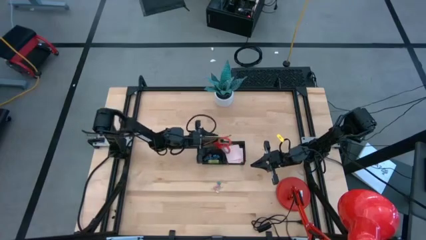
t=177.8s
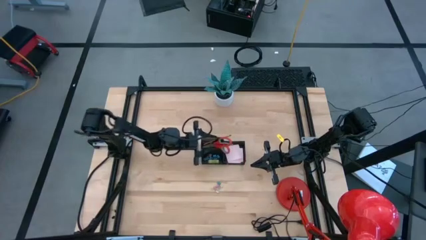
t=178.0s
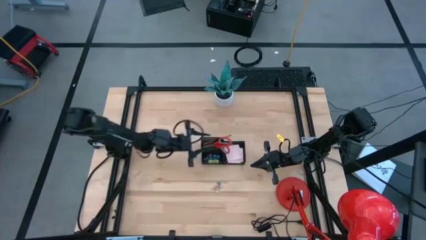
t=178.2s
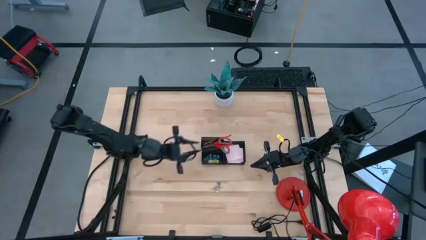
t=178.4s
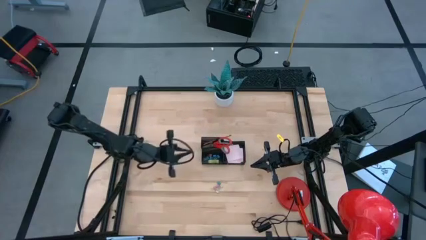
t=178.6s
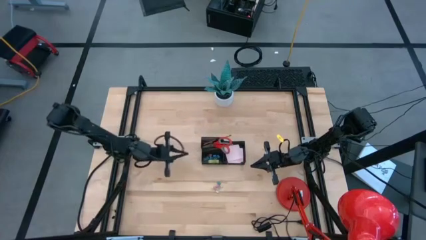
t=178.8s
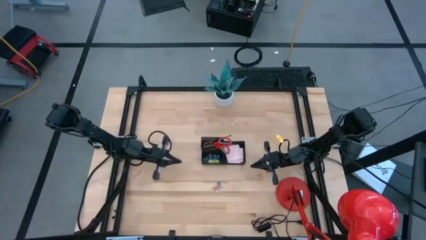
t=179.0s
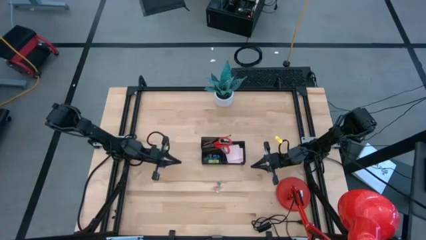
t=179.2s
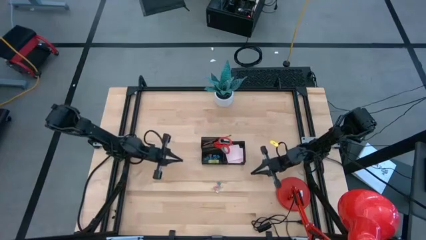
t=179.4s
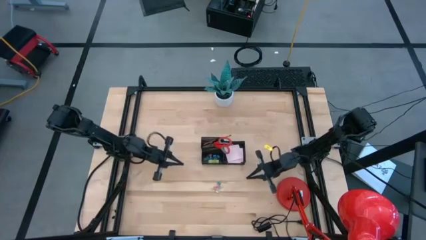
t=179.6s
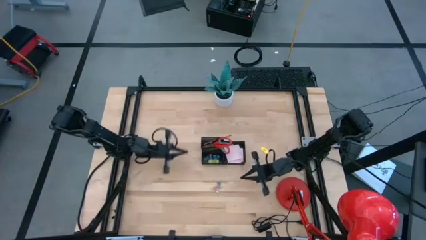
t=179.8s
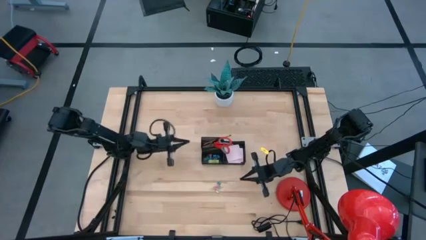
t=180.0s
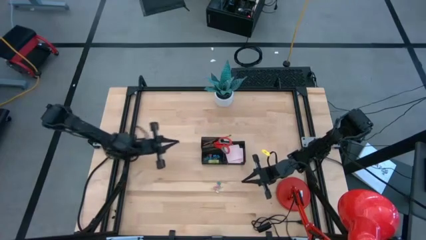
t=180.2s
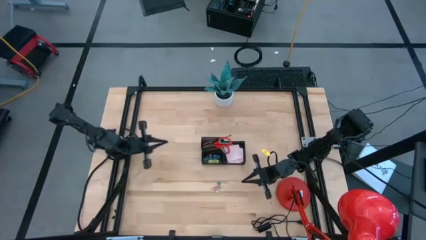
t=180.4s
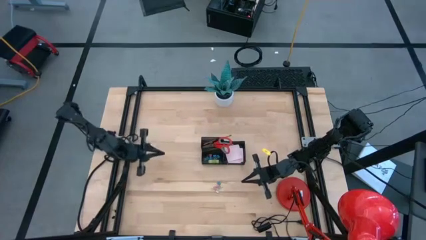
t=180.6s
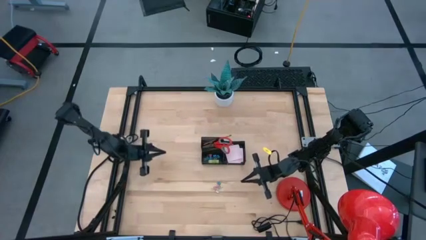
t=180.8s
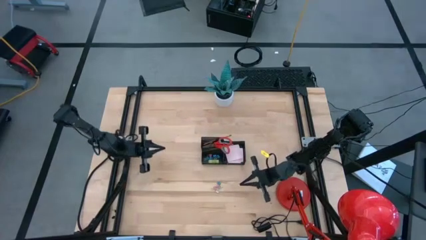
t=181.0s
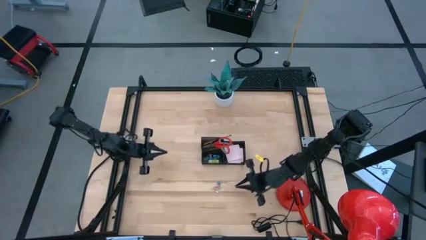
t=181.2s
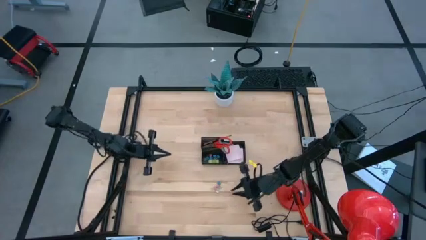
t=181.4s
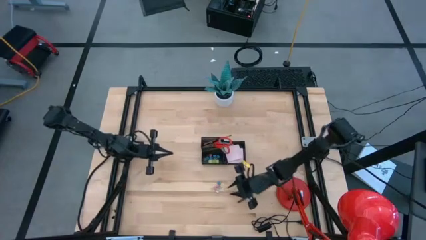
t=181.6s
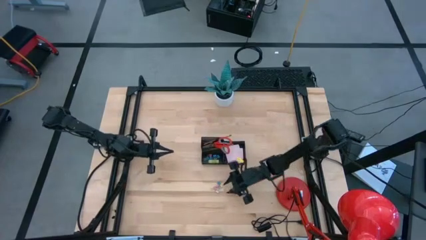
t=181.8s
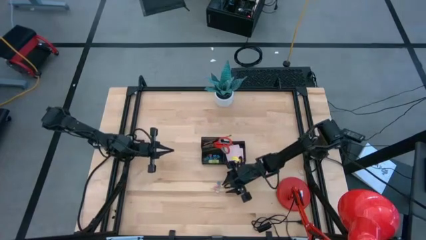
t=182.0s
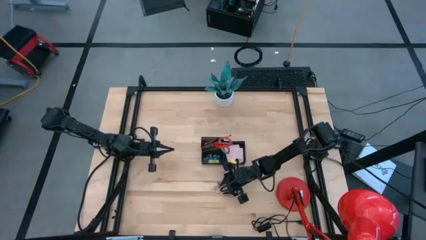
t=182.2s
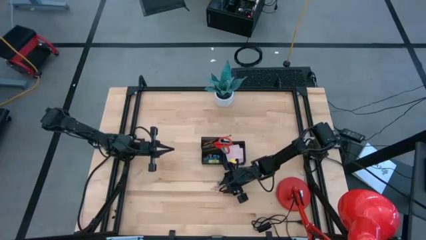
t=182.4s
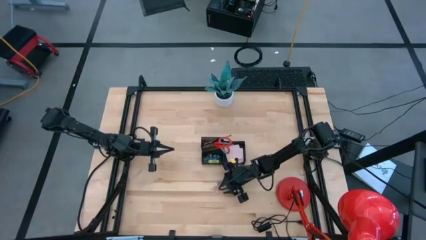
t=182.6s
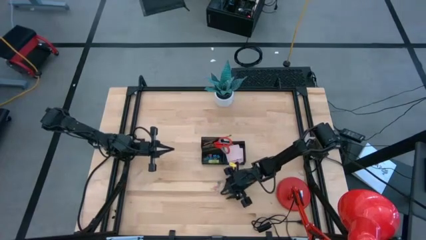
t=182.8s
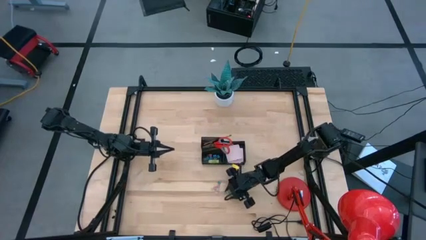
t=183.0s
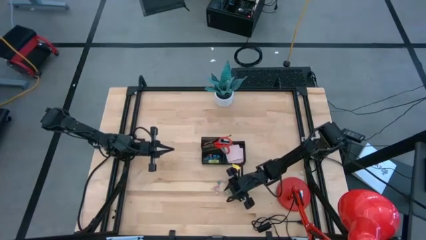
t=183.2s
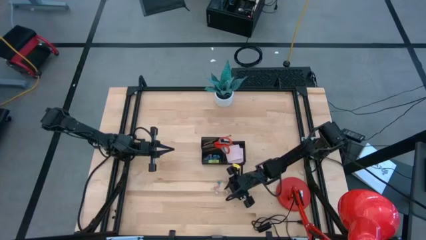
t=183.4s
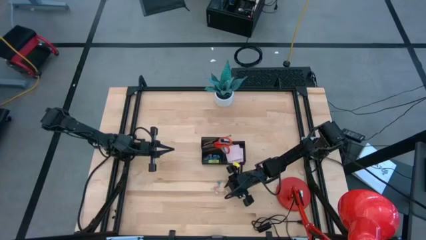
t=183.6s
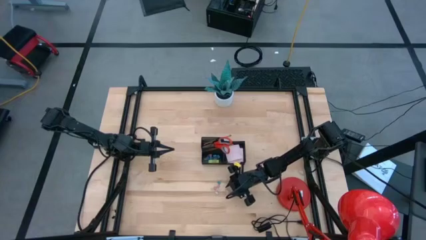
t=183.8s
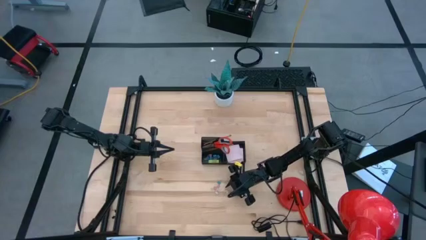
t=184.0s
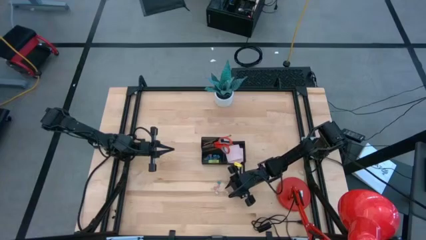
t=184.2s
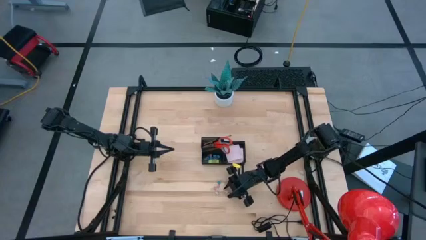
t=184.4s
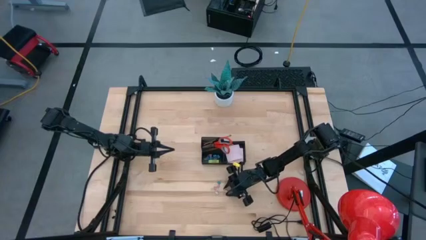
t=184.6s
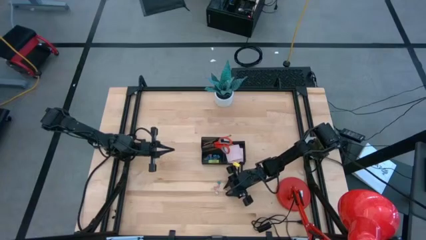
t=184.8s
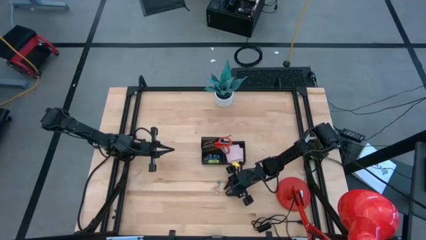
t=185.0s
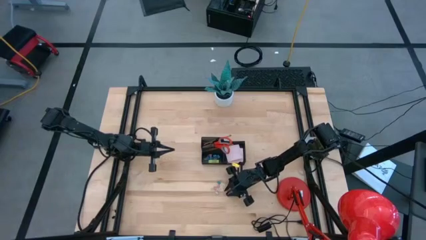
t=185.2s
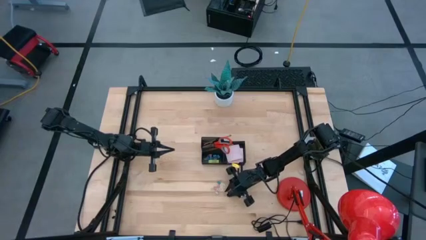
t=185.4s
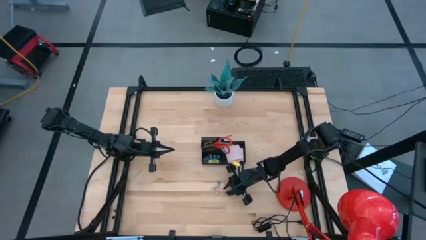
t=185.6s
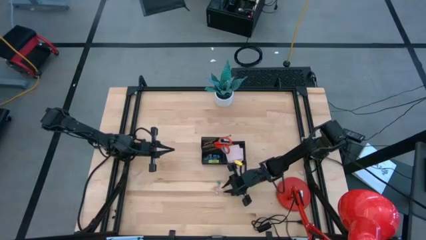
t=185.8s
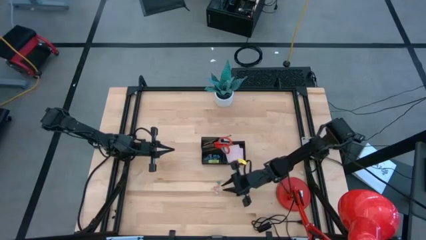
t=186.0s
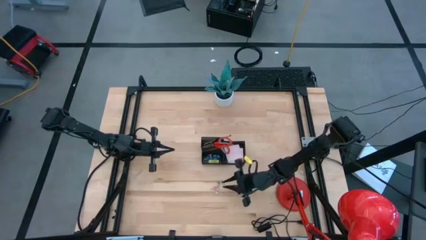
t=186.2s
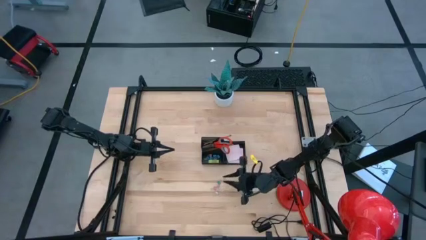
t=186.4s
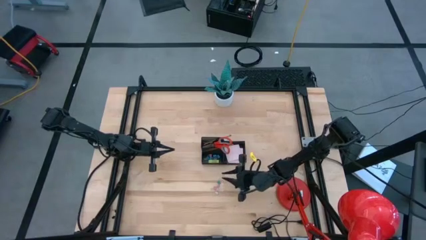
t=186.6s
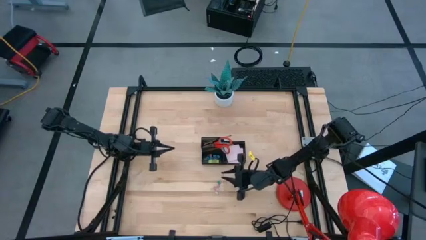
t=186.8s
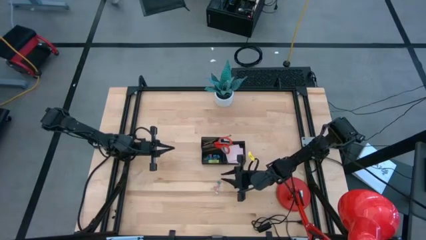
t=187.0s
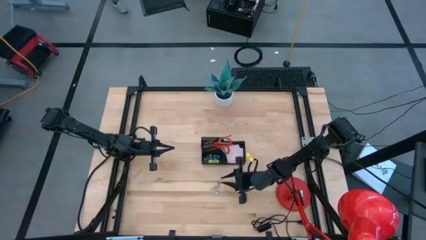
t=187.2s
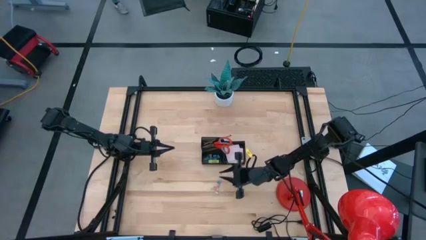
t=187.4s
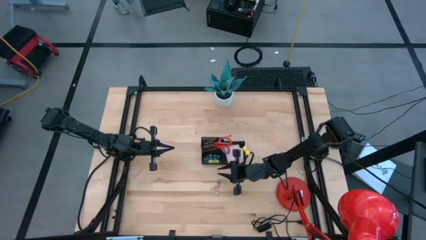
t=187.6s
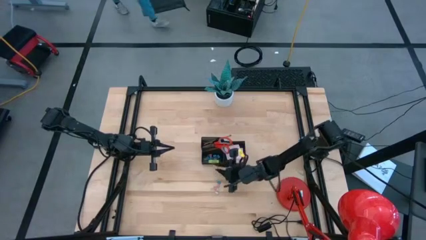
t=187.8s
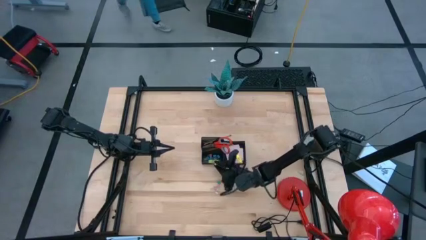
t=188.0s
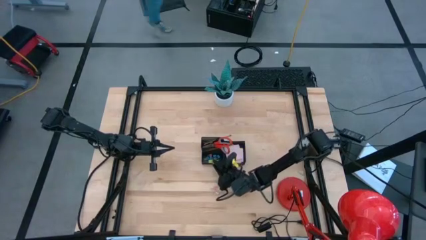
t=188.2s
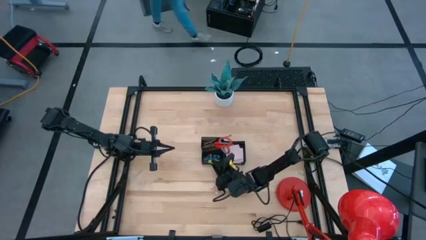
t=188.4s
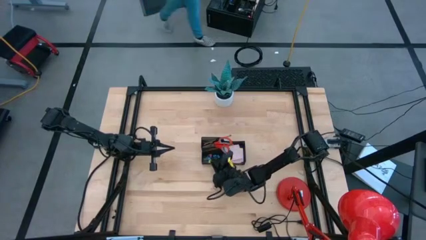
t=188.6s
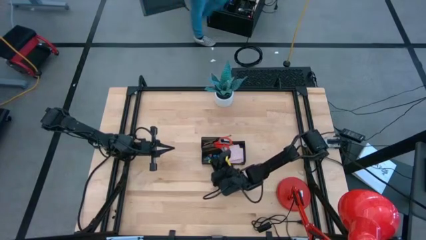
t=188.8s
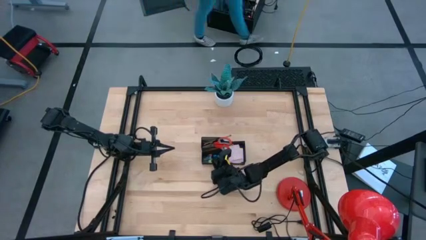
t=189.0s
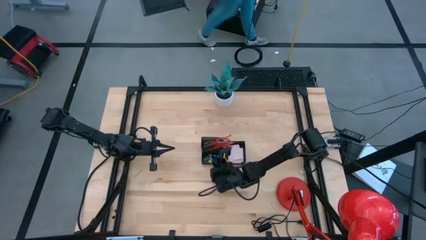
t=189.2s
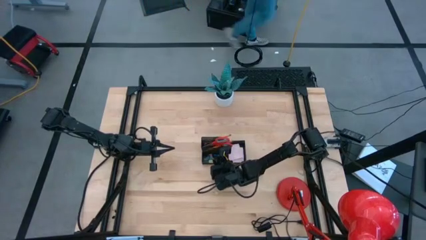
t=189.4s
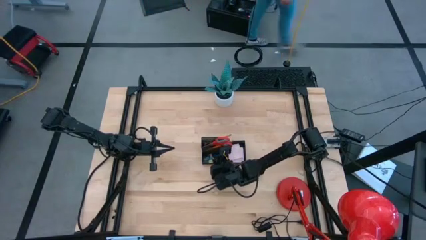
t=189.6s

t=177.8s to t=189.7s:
Task: Pick and place office supplies into organizer
Put the yellow binder clip into the desk organizer

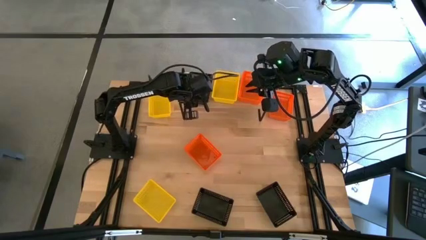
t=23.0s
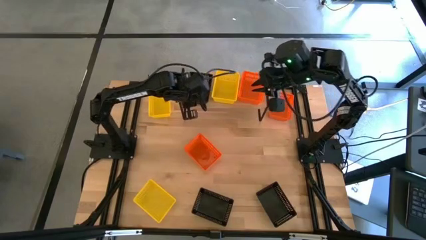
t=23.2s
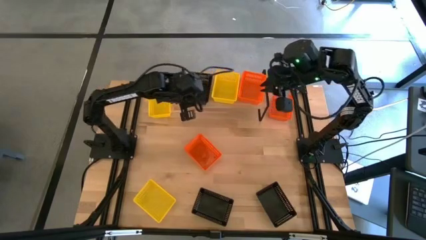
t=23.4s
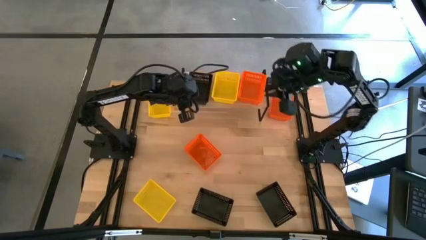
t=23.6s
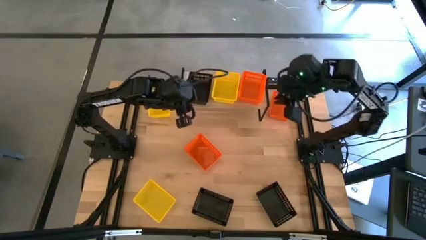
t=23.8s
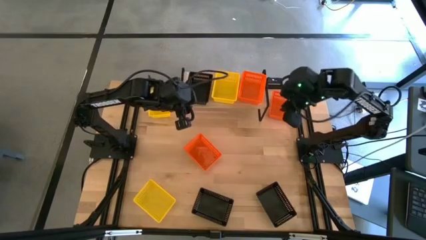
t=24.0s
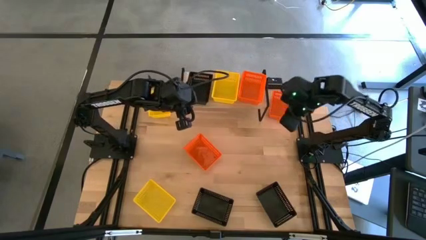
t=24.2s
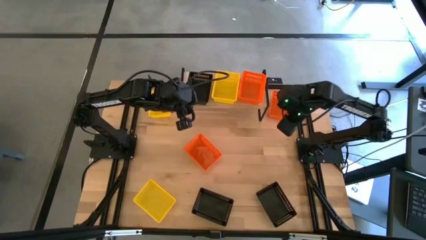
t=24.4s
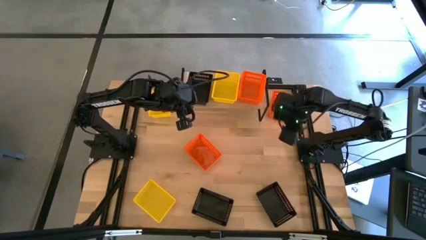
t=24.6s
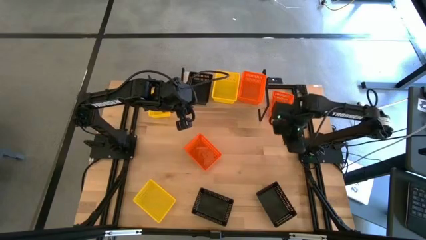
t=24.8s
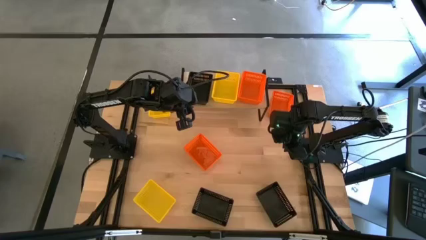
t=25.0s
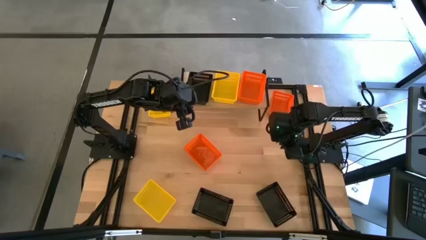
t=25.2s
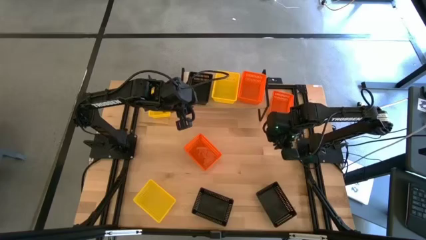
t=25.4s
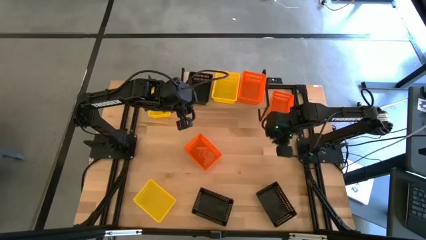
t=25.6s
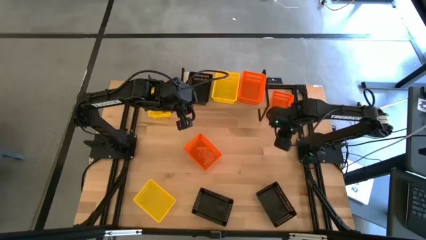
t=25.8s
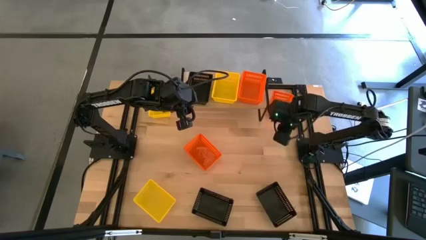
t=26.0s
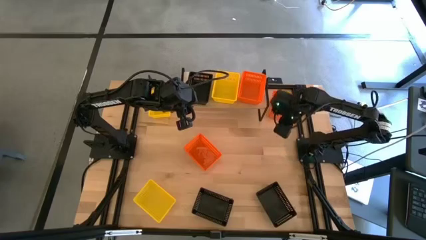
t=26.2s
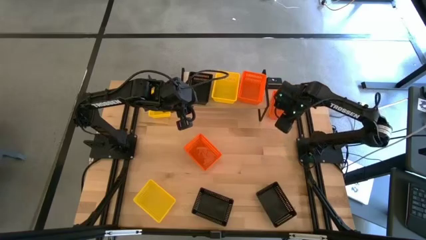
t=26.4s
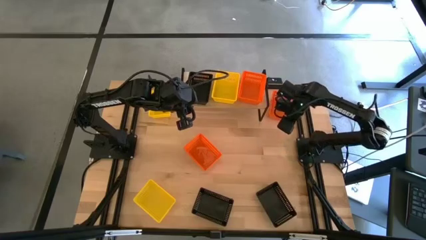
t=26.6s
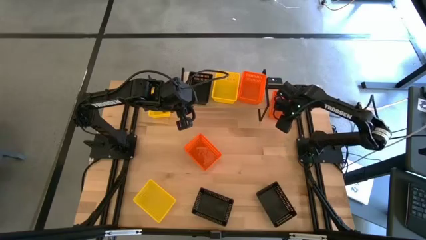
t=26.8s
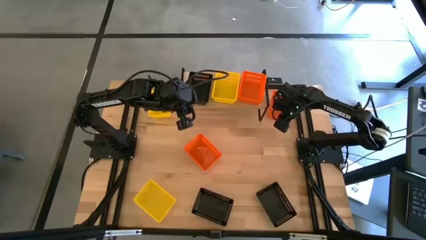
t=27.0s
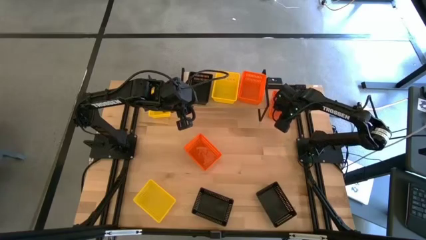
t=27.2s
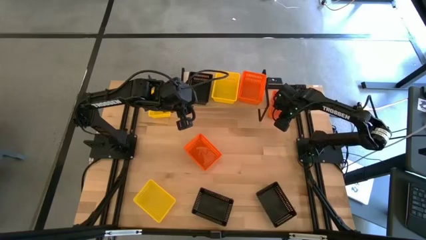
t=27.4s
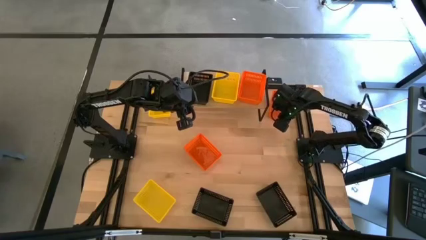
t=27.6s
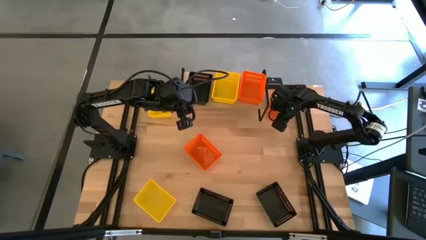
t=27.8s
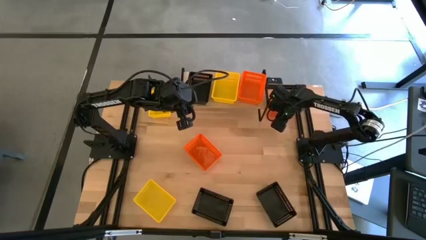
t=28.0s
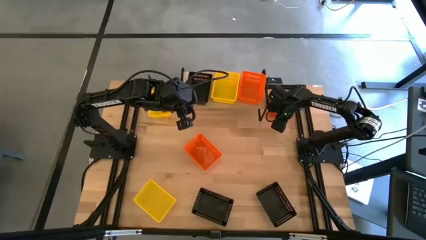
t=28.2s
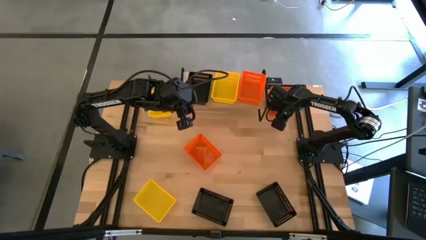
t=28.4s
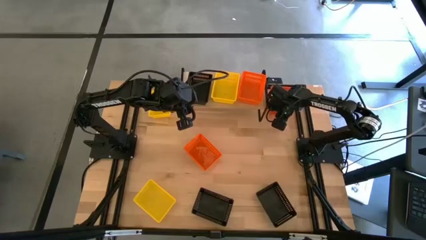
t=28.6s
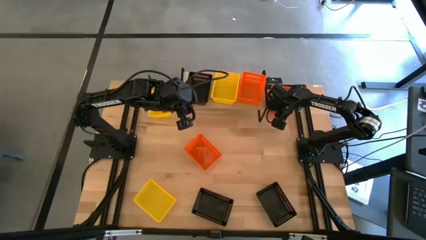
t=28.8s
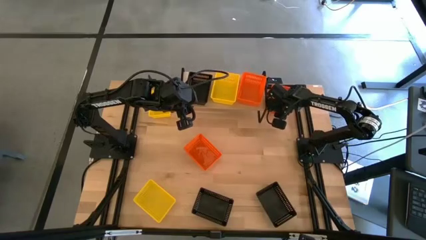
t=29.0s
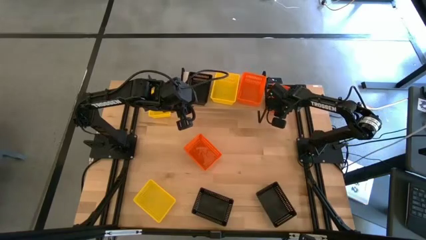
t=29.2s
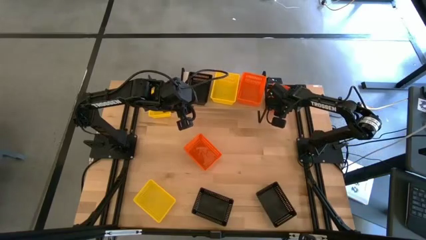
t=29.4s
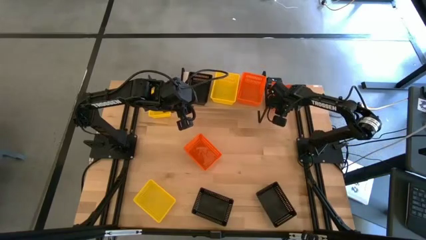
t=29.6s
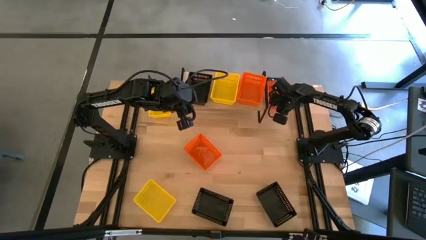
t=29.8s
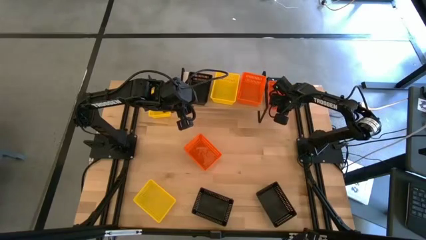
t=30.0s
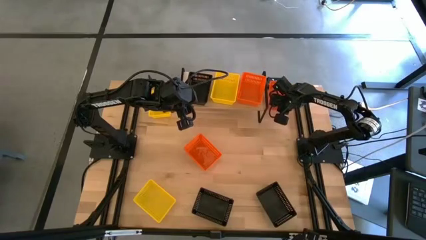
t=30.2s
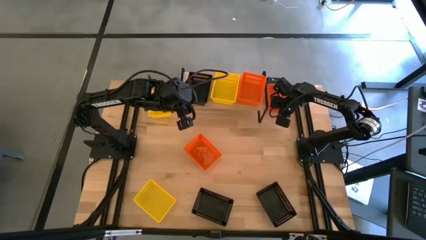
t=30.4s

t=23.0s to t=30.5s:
Task: Stack baskets on shelf by color
Stack the top orange basket on the orange basket on the shelf
